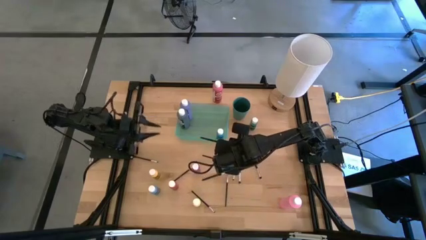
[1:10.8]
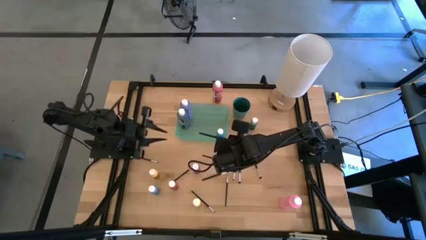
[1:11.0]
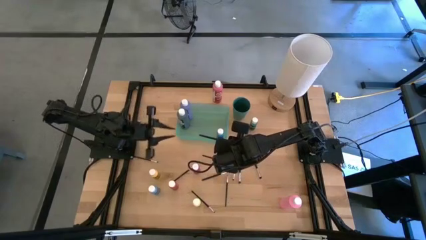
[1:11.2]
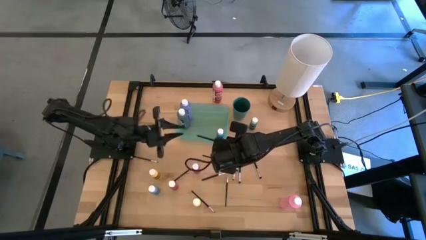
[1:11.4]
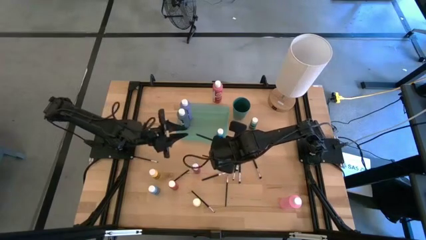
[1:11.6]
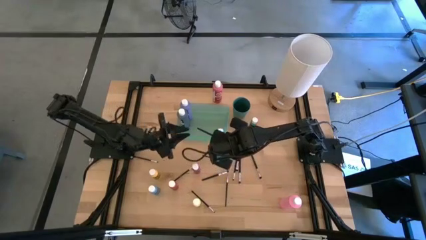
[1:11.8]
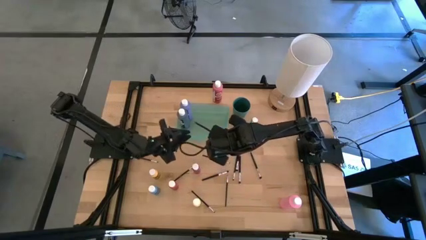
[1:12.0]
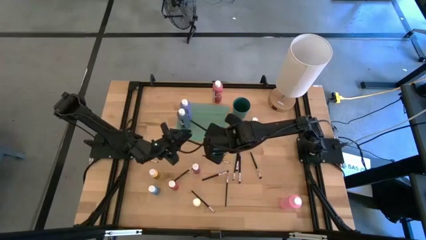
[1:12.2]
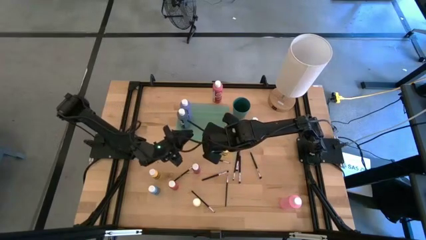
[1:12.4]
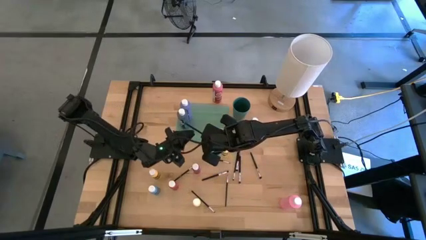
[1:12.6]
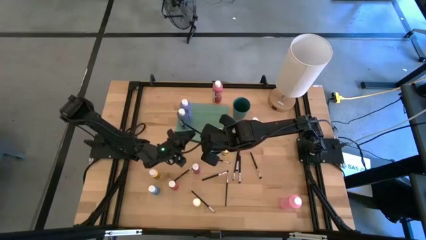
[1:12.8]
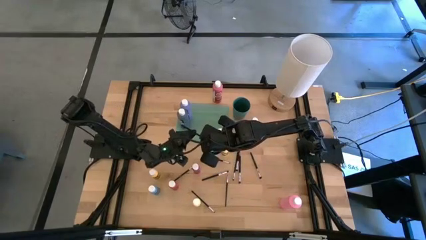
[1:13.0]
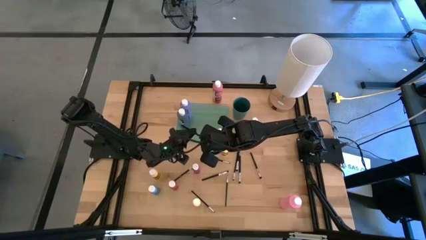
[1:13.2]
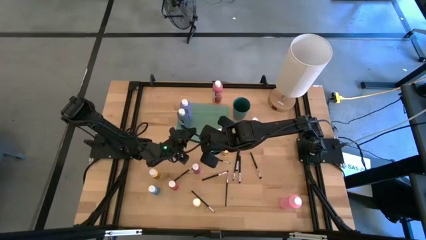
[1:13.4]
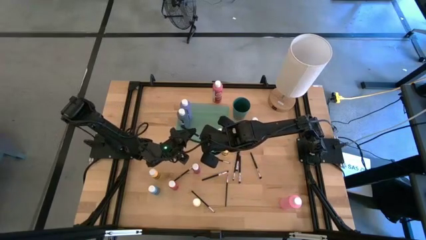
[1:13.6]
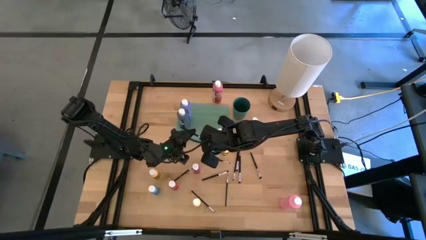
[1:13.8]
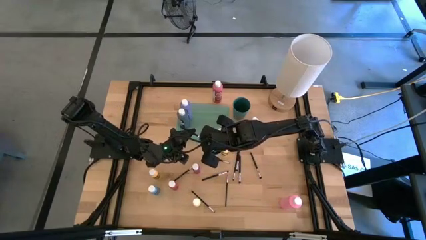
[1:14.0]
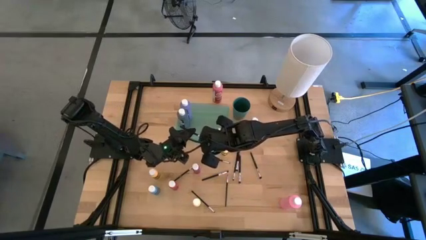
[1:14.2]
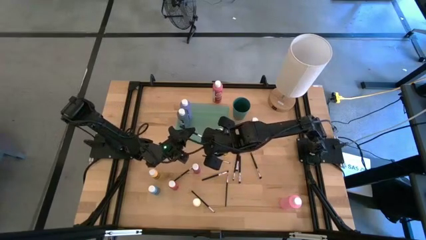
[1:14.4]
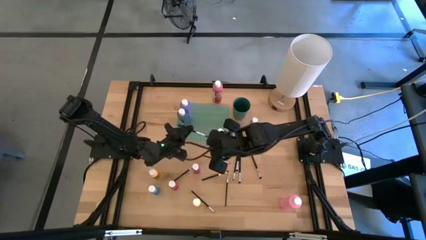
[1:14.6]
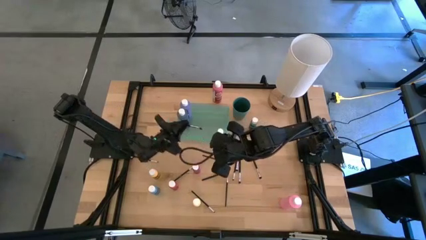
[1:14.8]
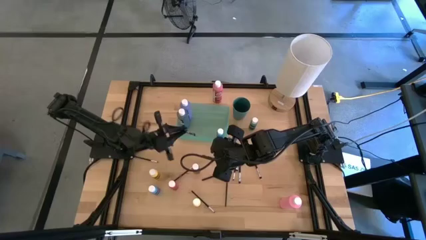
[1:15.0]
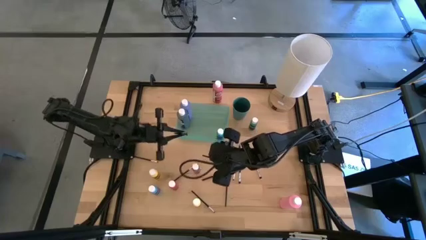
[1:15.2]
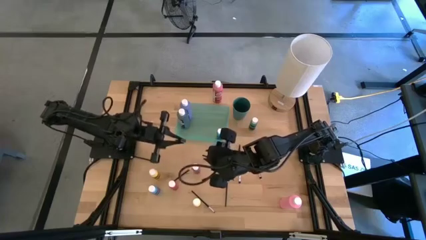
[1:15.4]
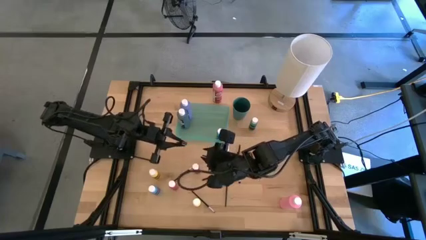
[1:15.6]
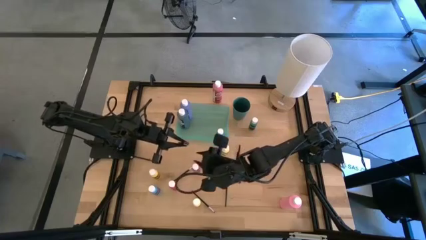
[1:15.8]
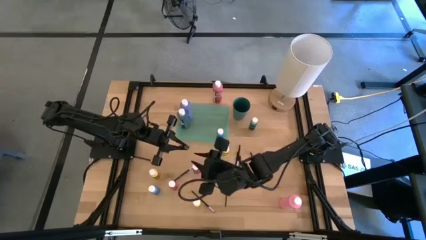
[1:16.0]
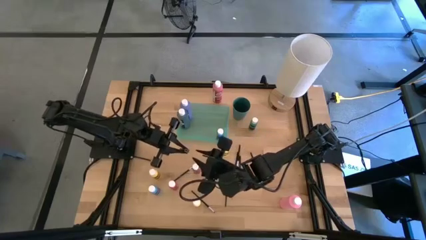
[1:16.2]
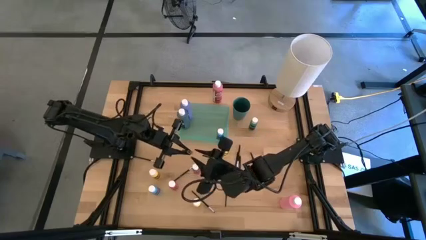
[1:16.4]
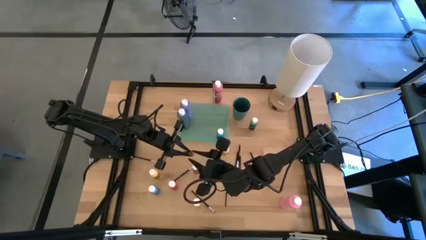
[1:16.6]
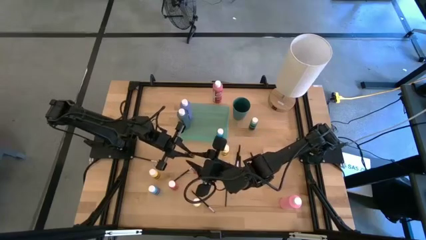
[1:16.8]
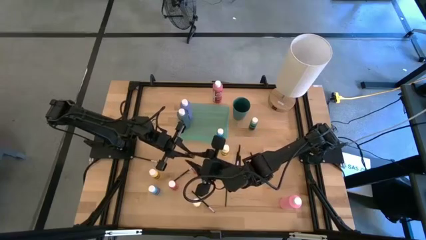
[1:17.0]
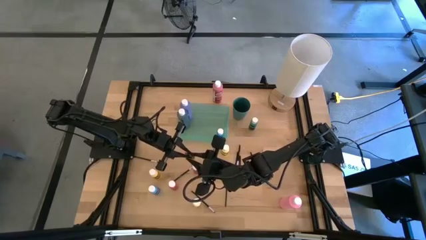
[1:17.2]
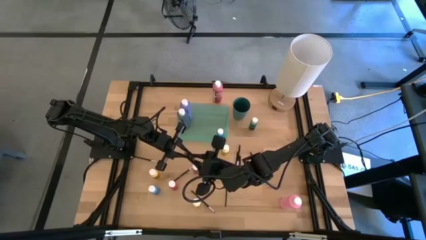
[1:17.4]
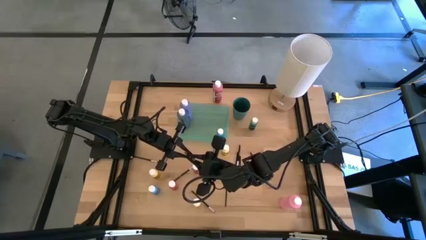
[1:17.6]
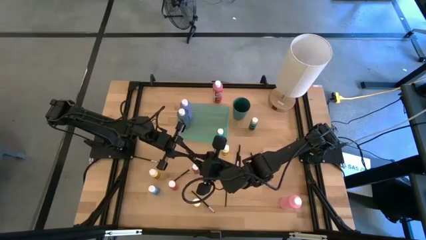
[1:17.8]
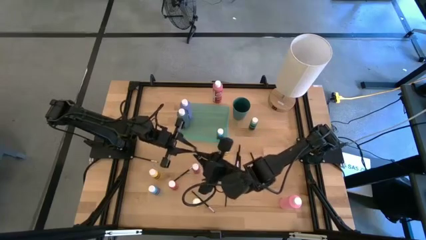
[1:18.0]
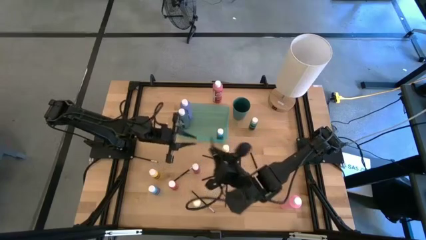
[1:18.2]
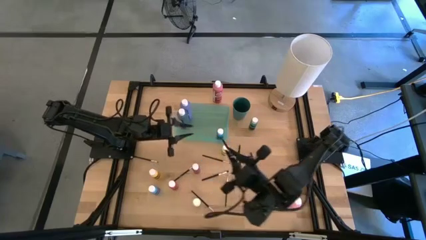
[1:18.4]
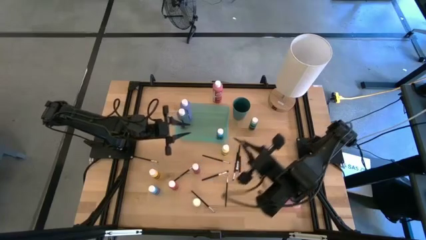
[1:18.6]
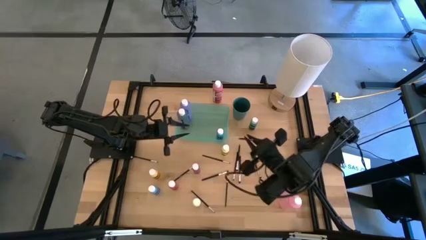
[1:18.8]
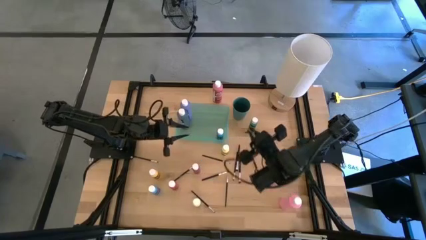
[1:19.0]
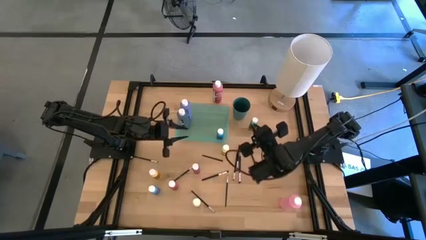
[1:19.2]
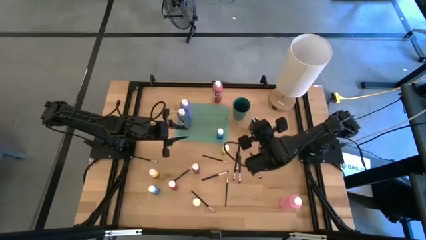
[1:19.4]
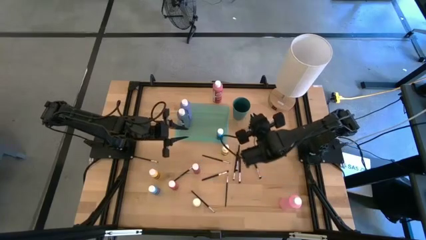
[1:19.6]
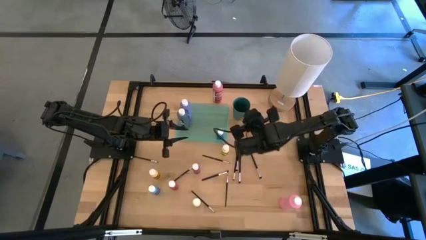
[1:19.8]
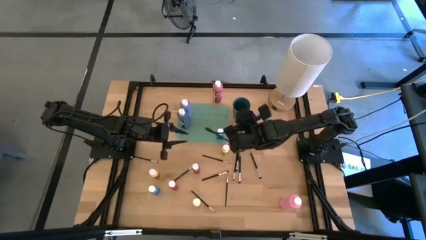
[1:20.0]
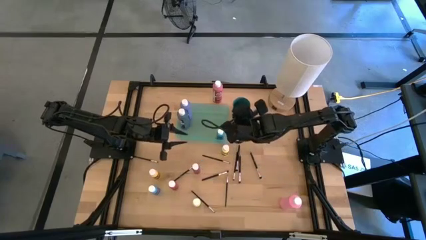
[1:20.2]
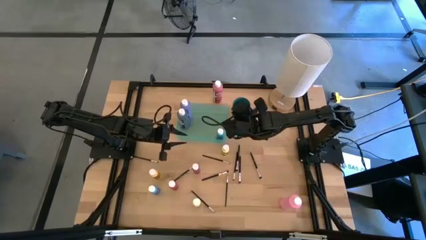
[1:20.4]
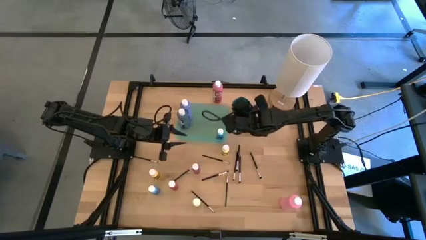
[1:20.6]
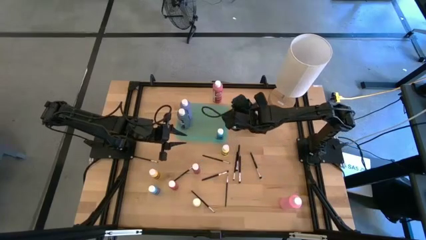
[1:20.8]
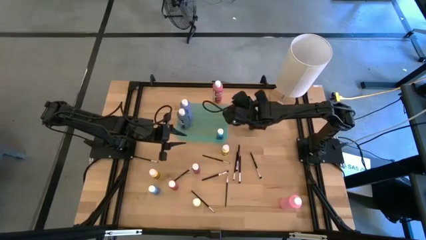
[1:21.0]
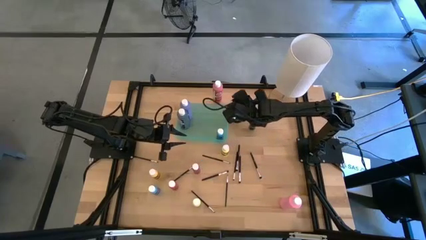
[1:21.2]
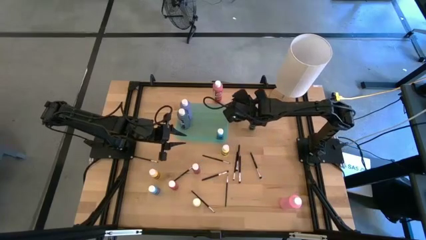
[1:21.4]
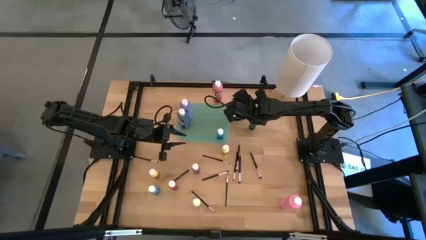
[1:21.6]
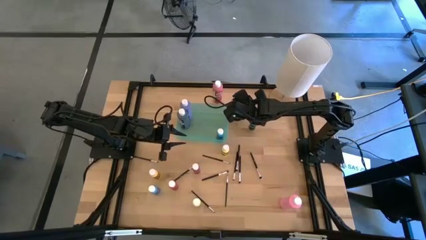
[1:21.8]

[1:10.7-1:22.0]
Task: Pick & Place Paint Supplies
Put the black paint brush into the dark green cup
